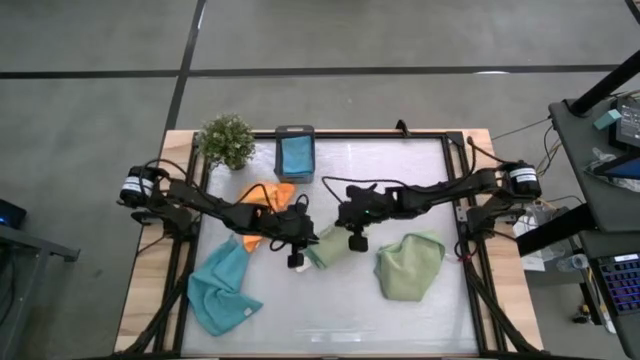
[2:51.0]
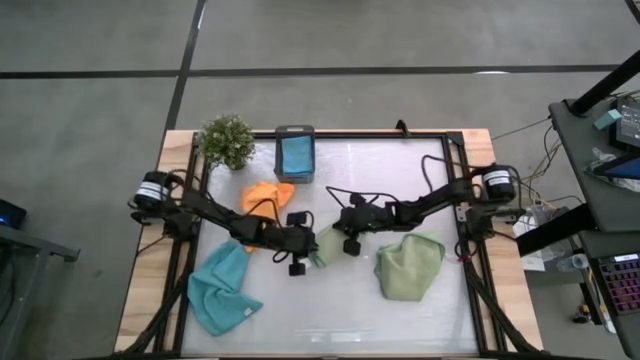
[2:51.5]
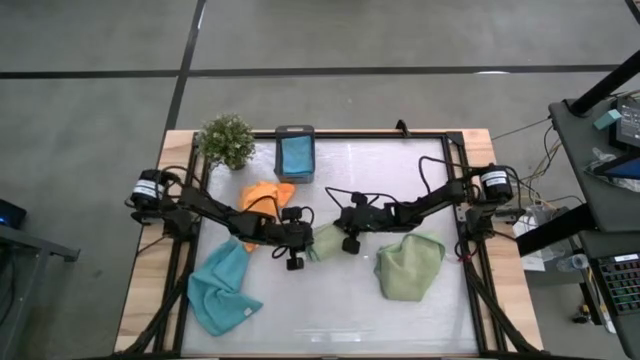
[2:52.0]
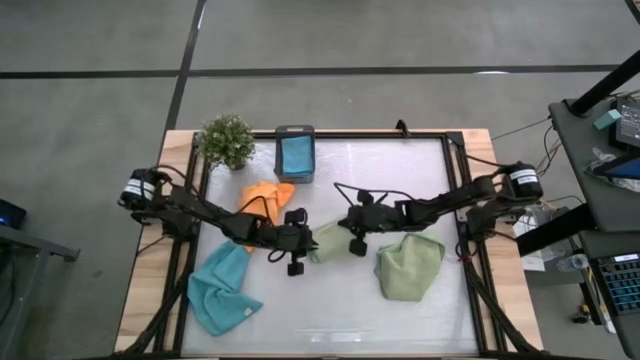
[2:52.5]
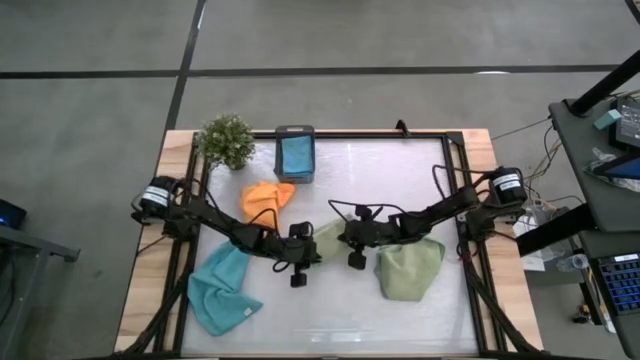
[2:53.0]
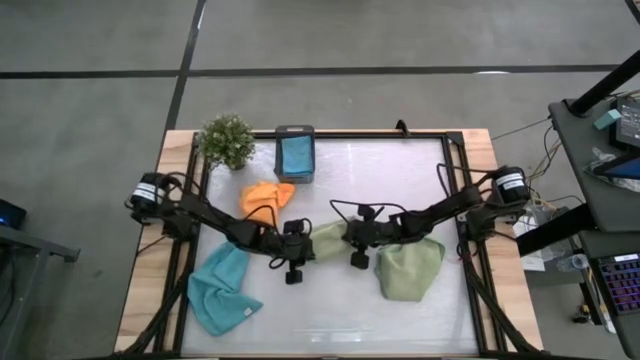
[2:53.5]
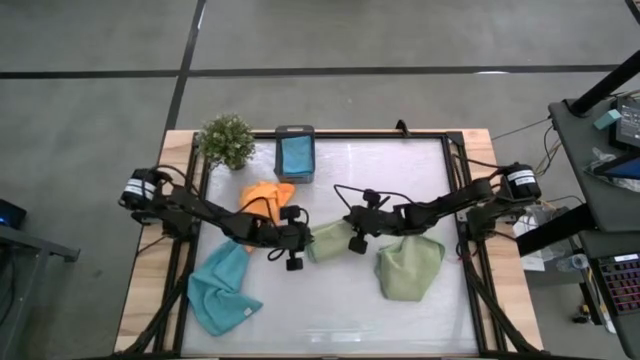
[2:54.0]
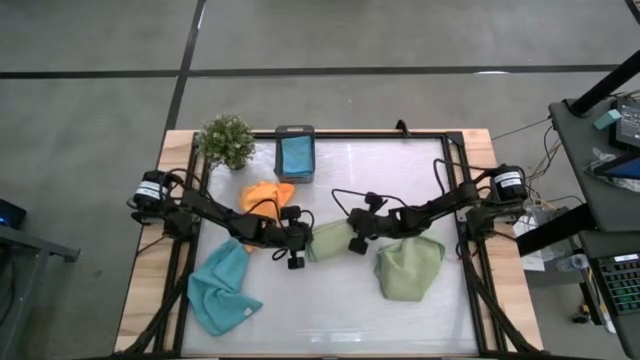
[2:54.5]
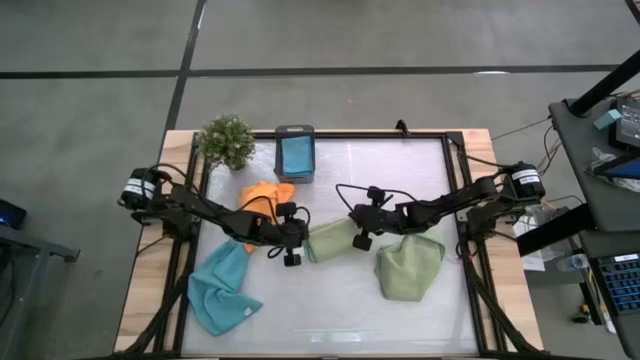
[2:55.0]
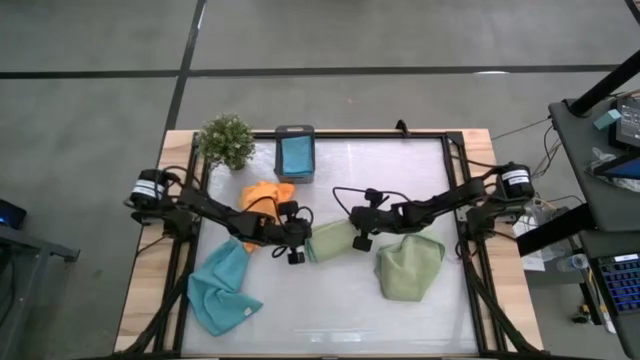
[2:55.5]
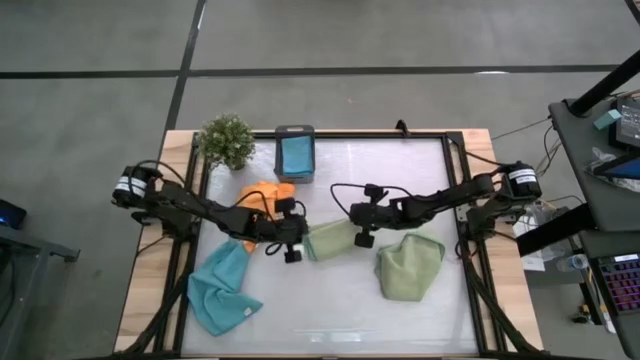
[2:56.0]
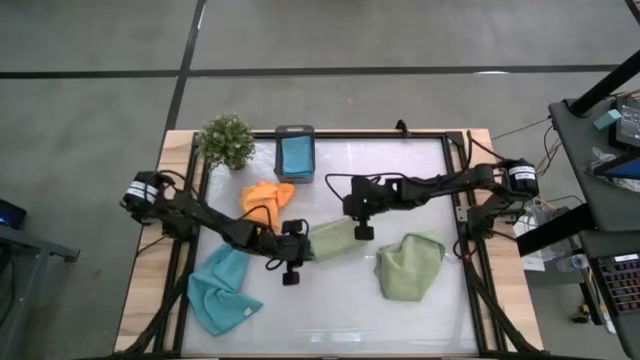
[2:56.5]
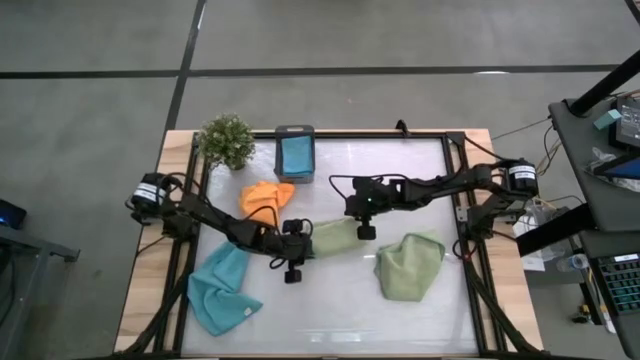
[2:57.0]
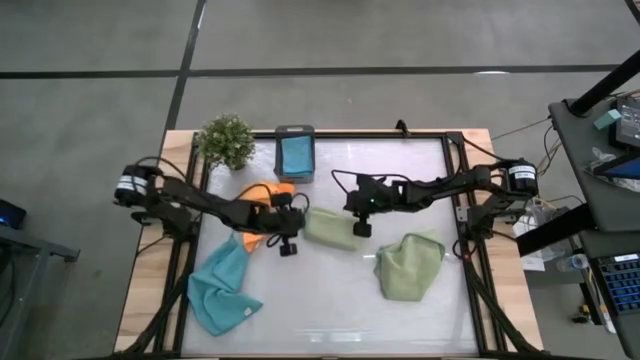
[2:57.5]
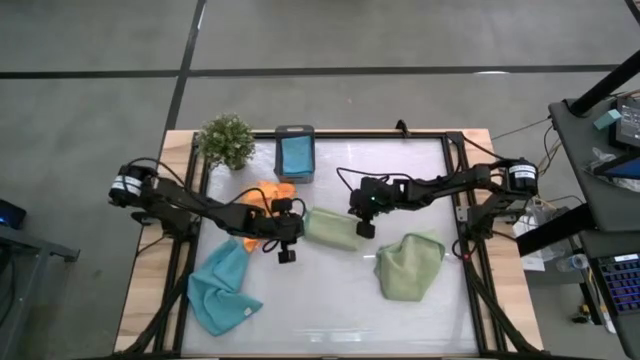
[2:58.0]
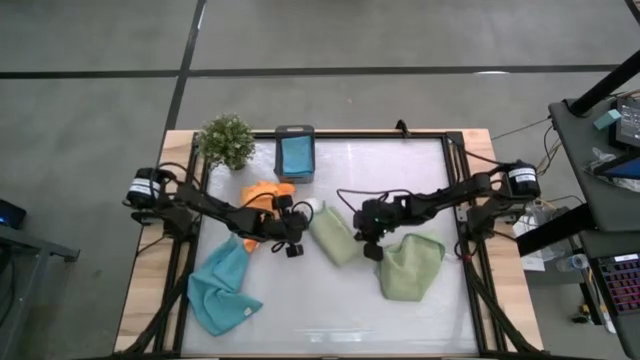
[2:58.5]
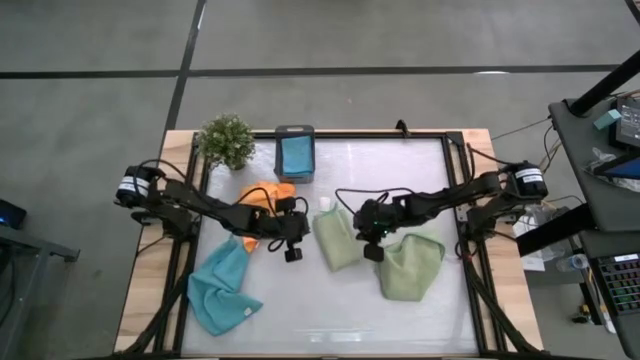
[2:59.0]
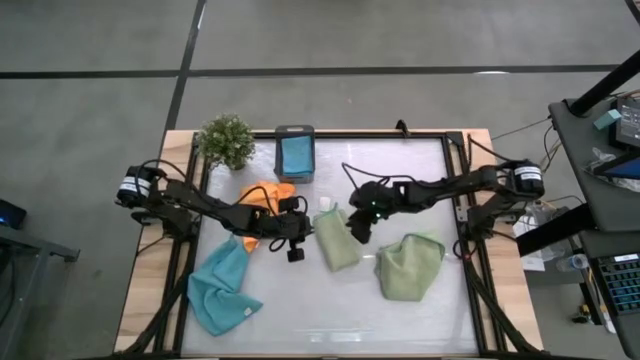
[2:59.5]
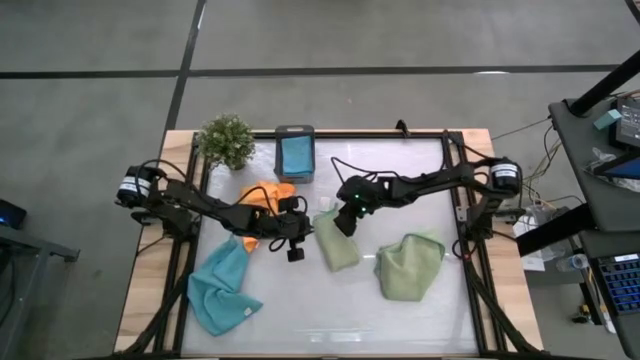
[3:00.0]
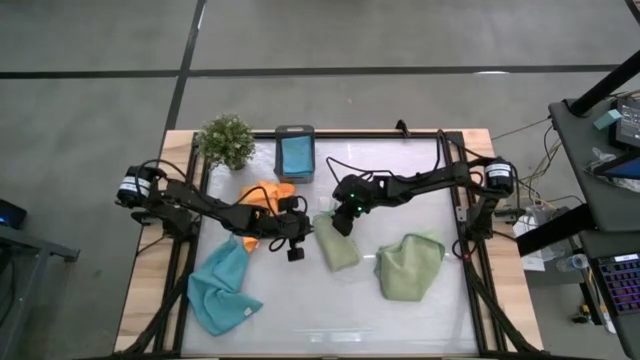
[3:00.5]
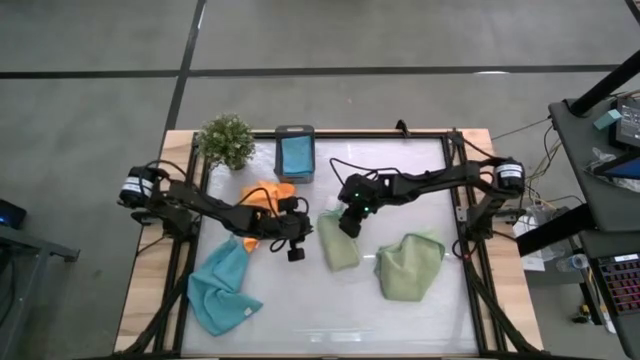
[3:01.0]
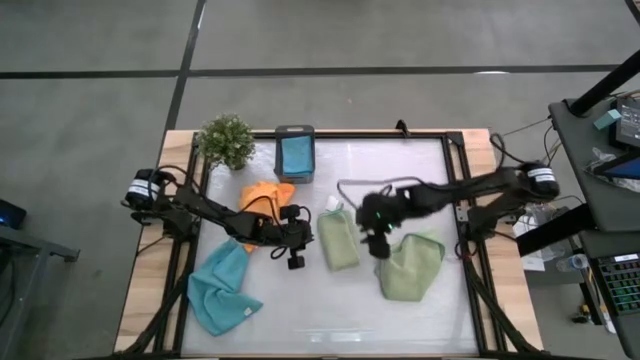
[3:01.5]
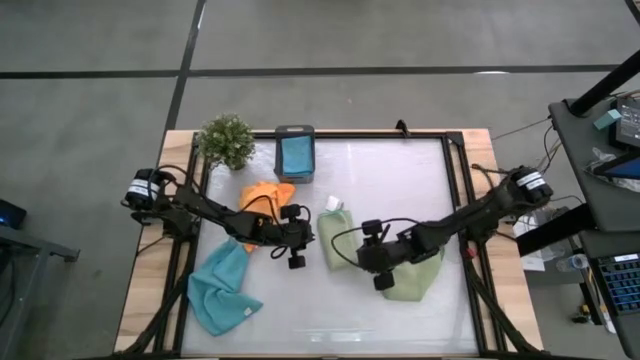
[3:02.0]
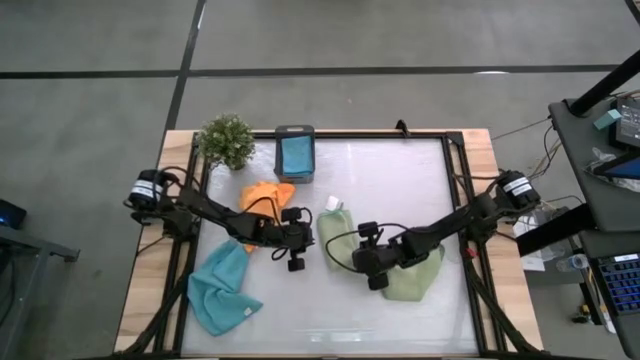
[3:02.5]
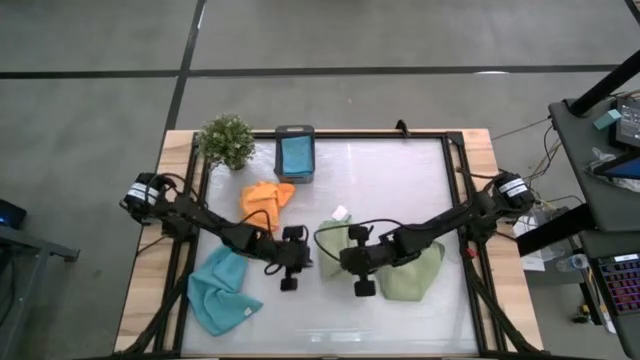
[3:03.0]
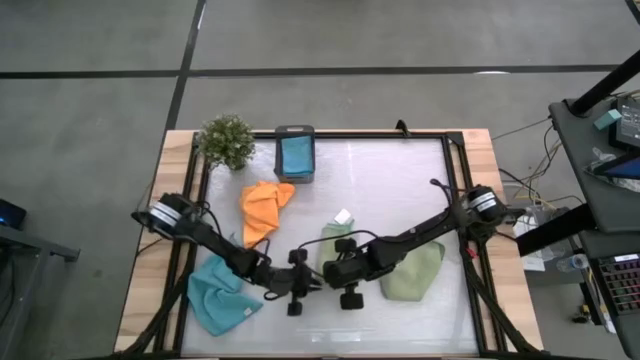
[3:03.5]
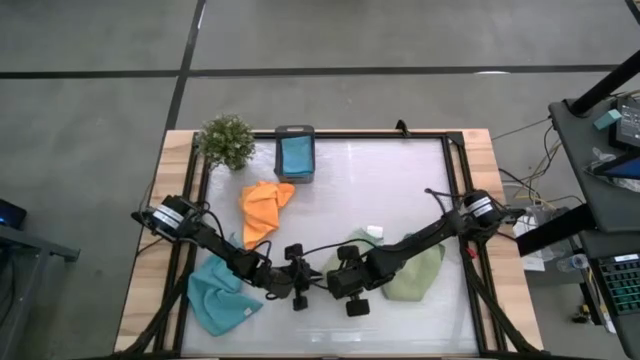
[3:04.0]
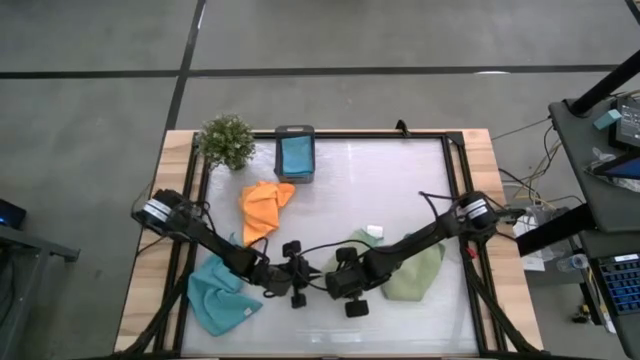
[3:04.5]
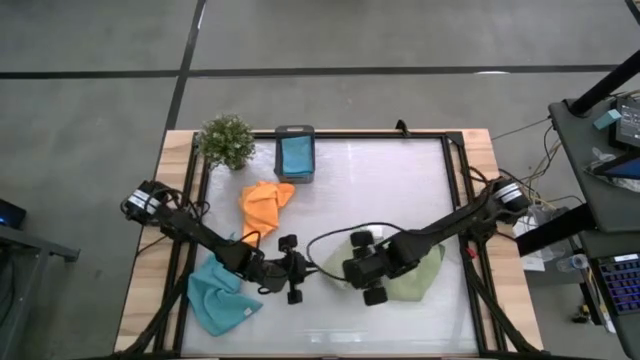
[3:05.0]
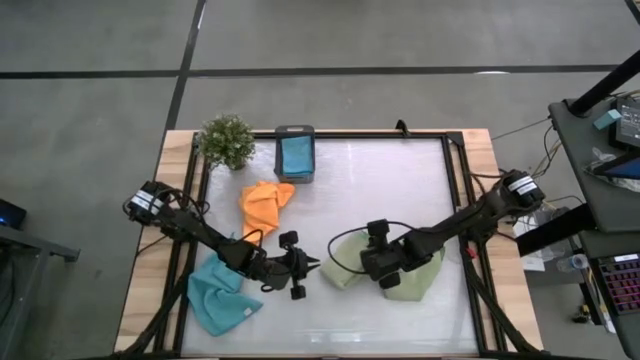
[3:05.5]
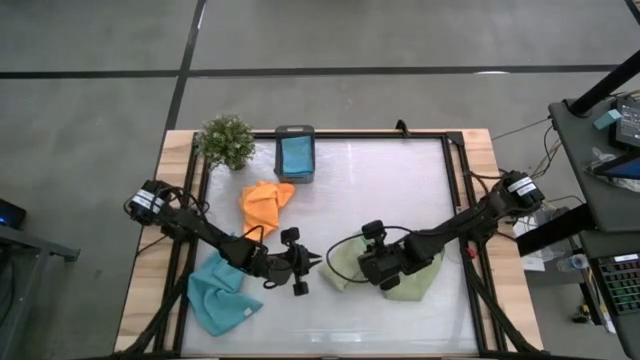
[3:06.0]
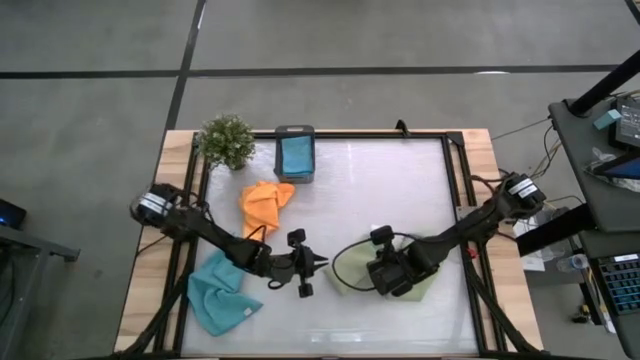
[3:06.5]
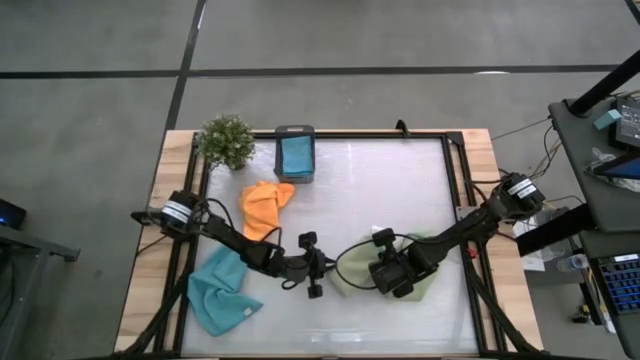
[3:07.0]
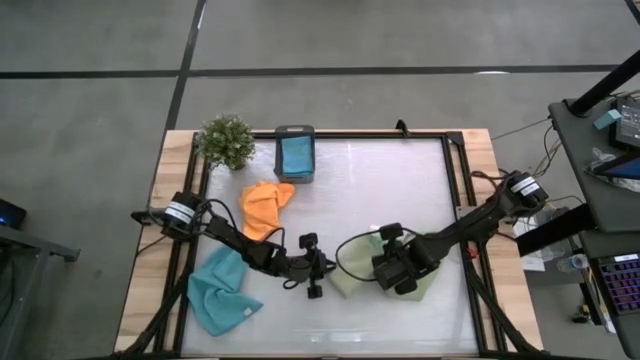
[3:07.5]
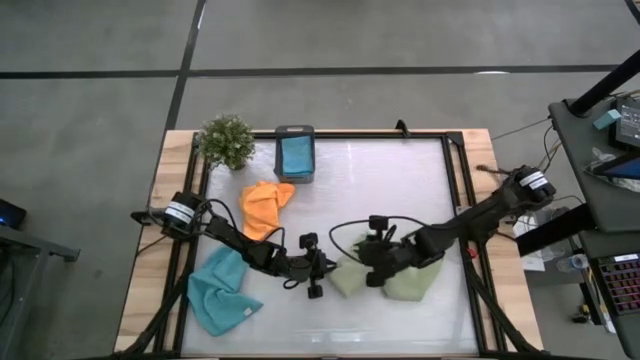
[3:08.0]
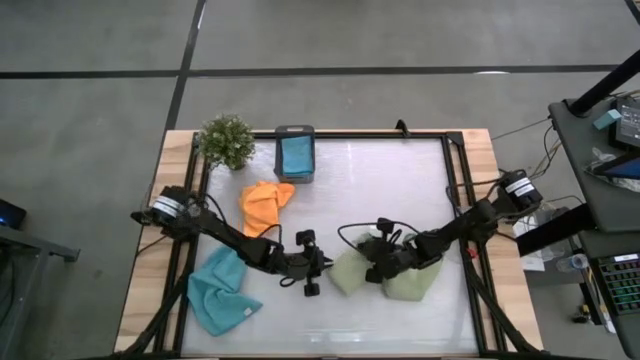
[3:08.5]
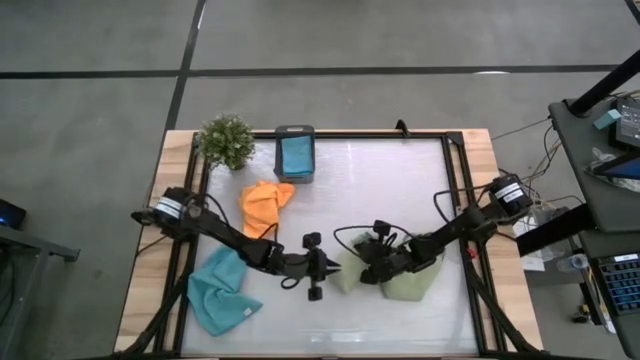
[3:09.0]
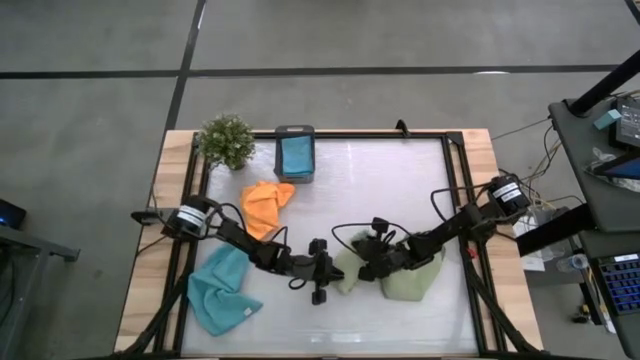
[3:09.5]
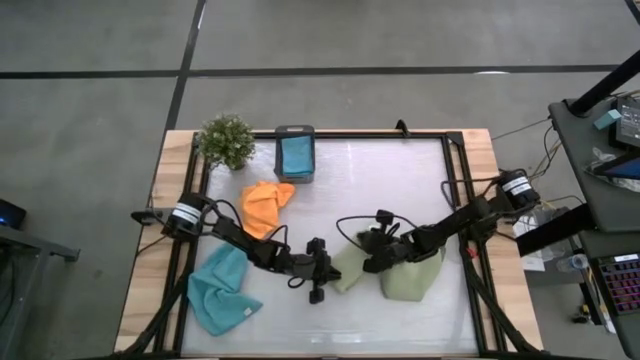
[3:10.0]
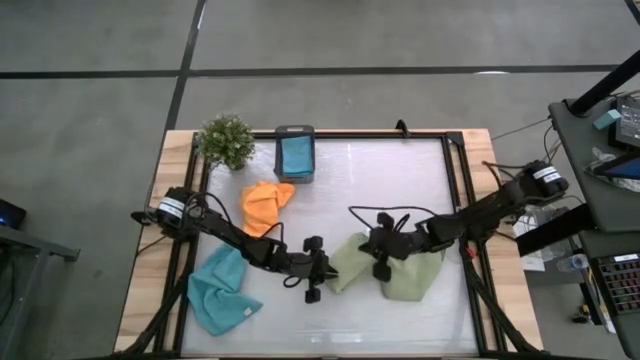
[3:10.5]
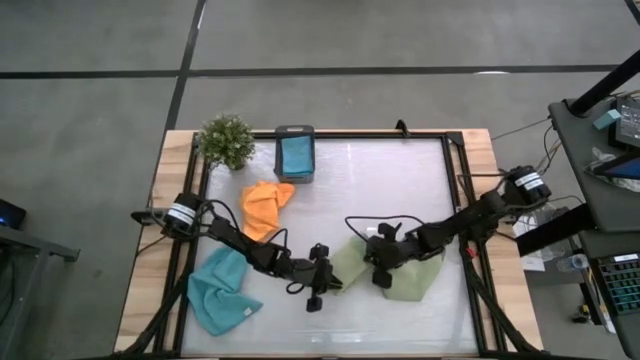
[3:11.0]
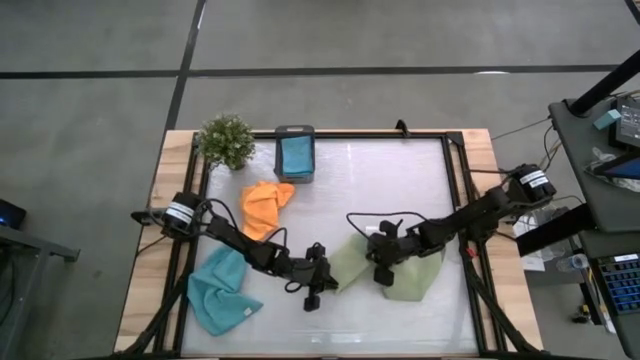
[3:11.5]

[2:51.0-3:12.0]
Task: Fold microfiber towels
Fold the top green towel
